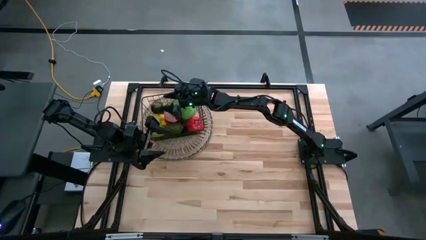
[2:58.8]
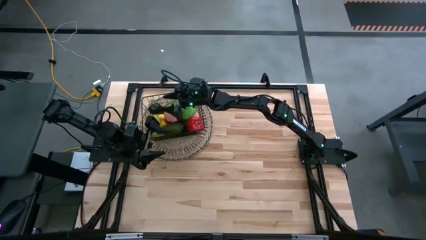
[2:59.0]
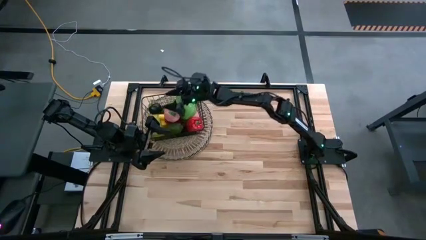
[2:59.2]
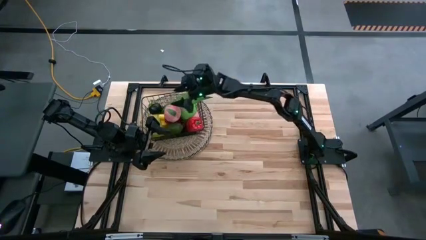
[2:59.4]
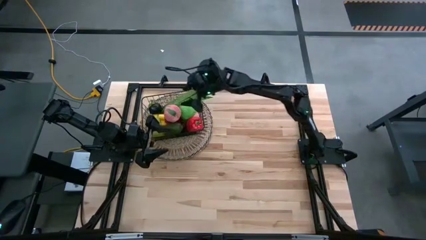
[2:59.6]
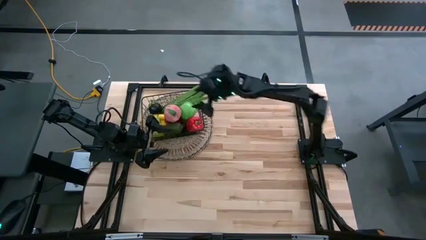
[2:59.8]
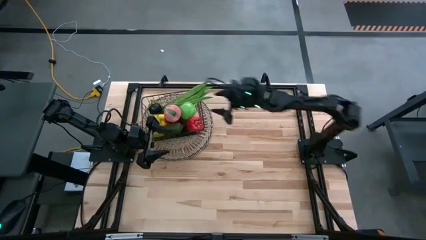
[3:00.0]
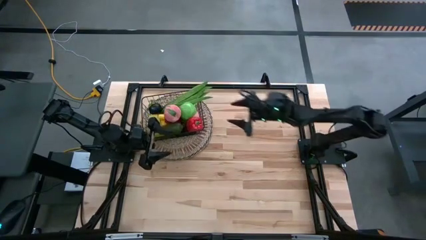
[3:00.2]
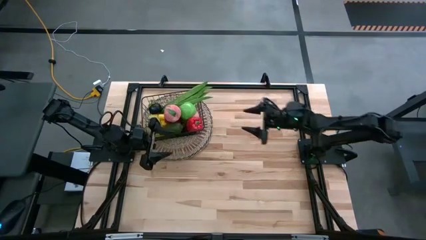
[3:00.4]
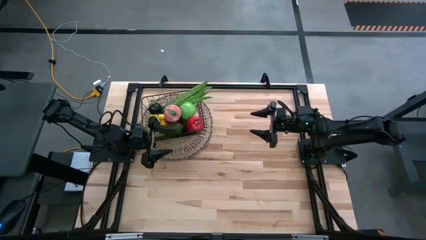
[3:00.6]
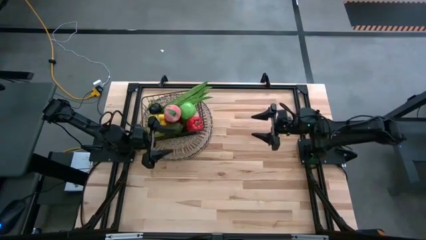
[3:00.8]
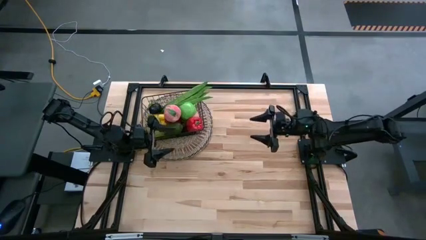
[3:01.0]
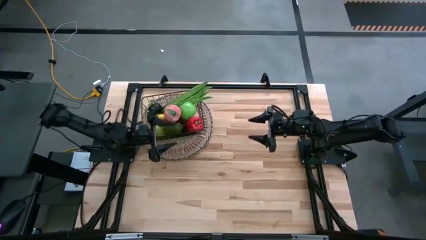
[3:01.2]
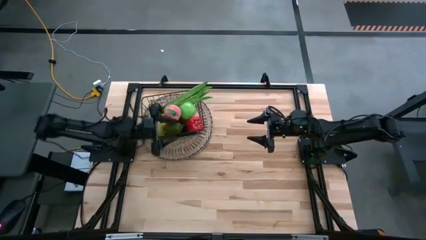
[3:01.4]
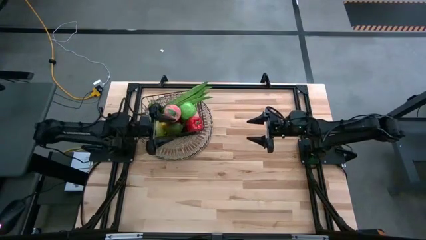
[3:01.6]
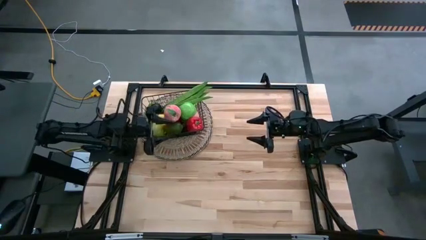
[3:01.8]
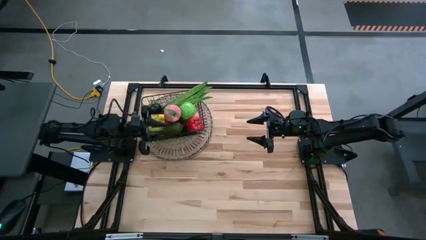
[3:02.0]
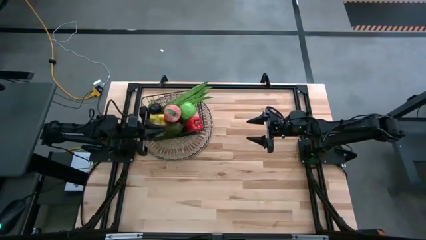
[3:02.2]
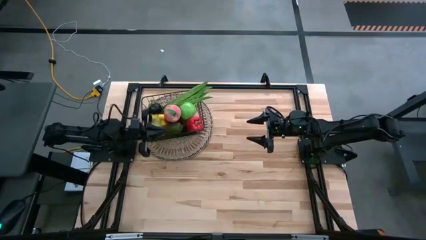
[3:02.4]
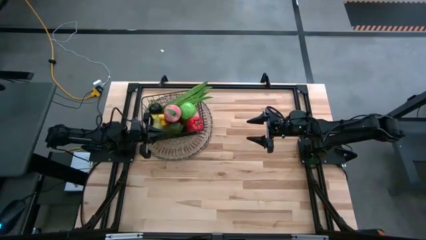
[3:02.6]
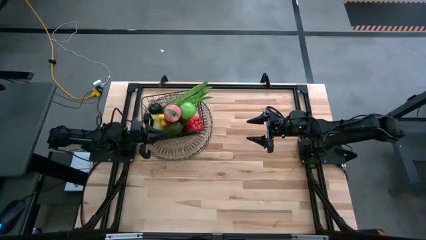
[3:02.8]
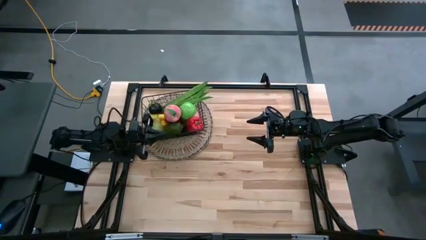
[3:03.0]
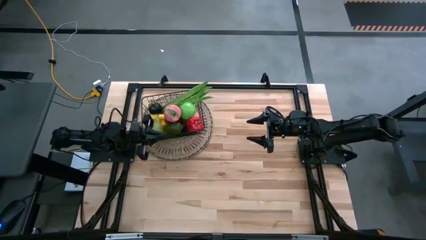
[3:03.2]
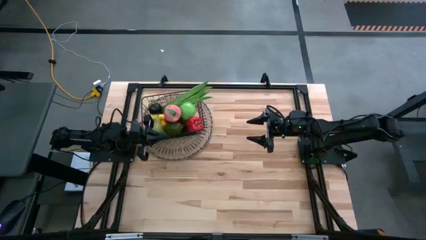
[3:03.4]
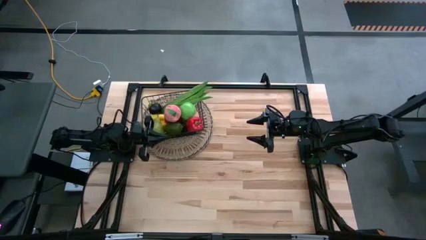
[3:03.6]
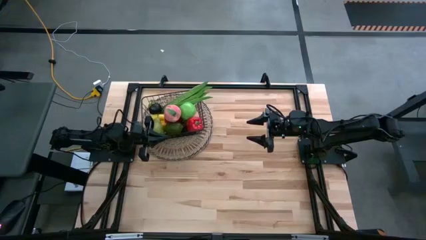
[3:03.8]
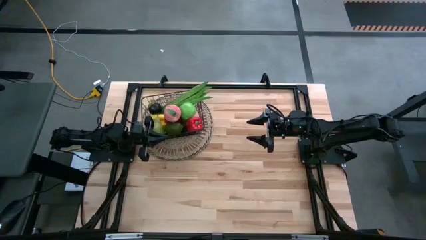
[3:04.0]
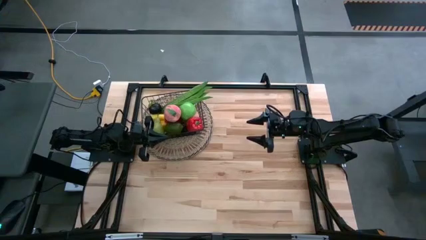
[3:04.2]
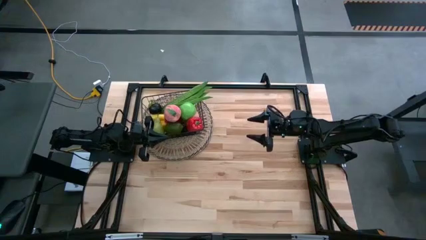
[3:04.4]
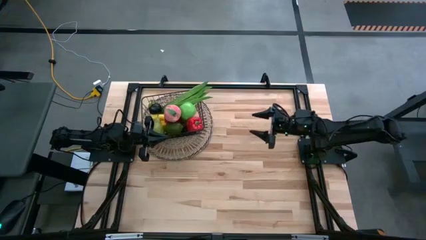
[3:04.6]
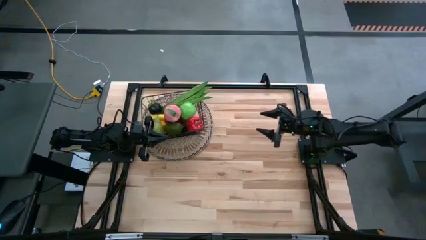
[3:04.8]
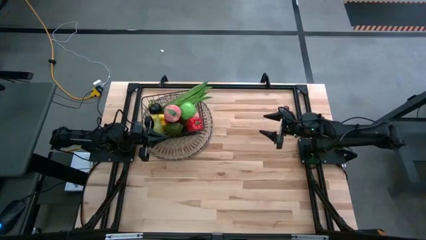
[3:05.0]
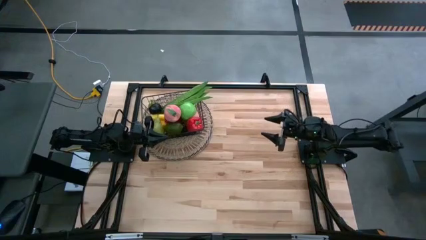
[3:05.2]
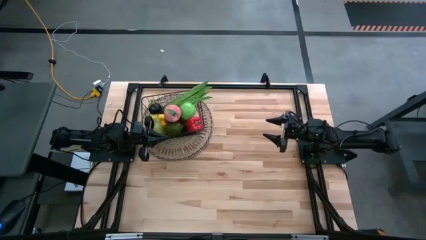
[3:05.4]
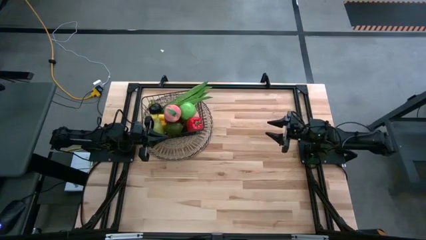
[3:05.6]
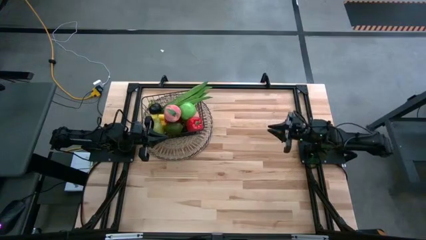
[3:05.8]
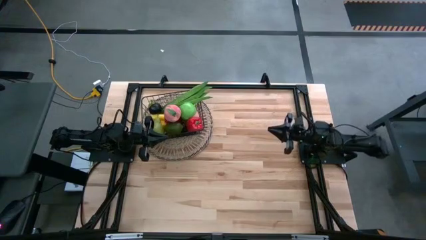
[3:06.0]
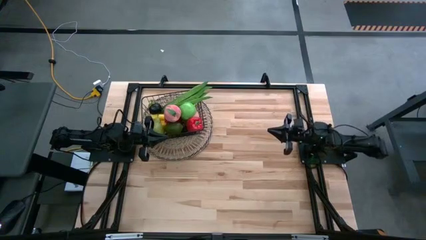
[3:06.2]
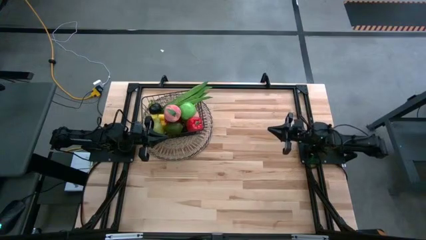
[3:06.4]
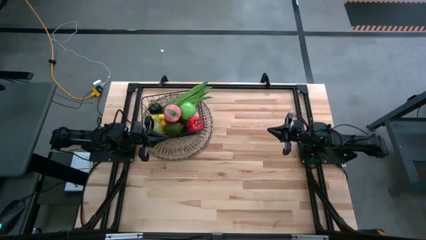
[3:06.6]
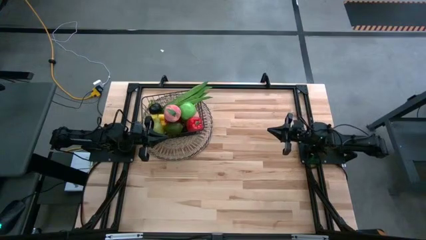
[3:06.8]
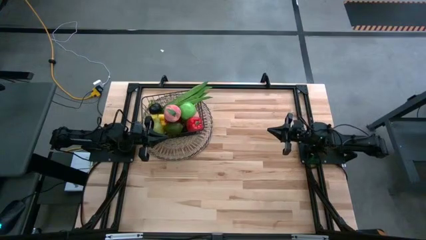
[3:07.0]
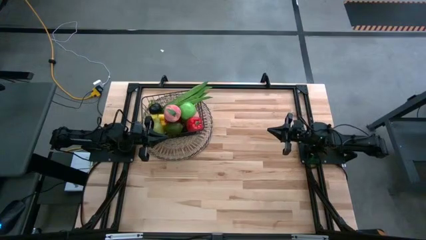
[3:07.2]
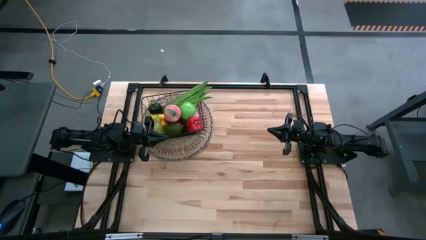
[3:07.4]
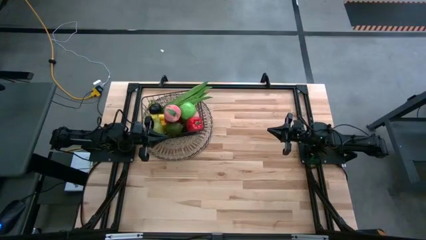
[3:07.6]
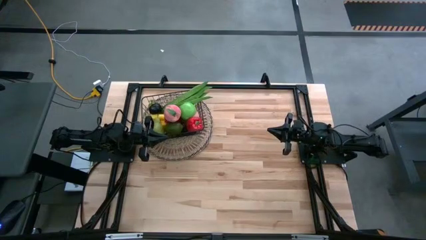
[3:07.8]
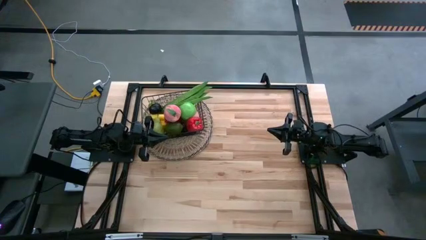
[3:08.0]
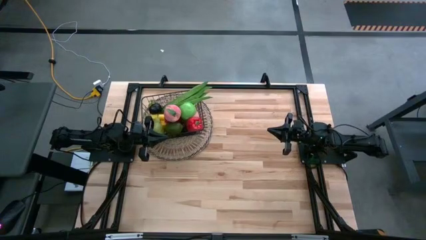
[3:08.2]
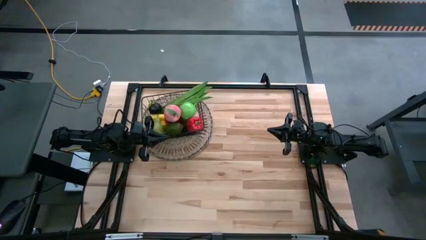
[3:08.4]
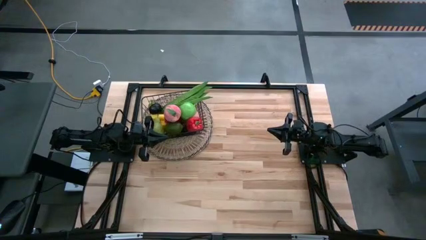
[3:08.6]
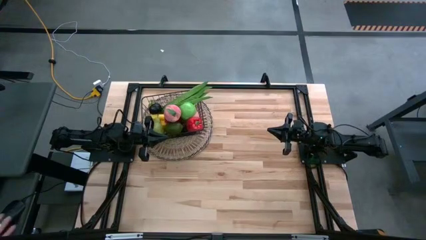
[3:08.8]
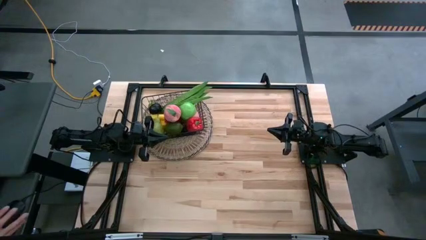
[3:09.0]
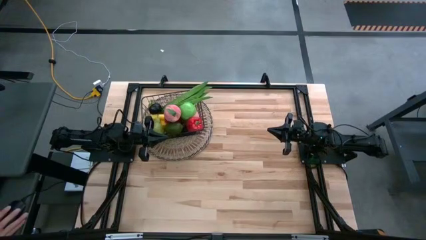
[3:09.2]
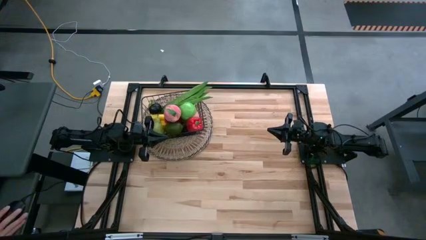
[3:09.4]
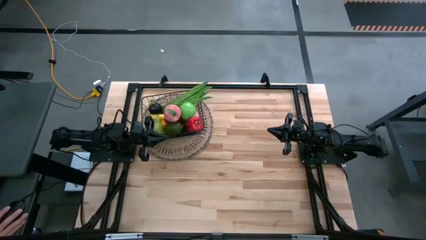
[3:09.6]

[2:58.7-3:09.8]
Task: Build produce basket
Return to Home Position
